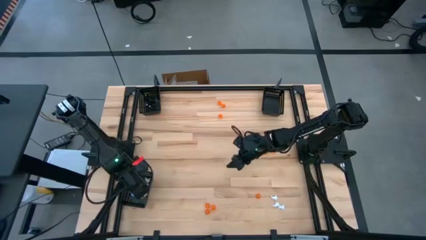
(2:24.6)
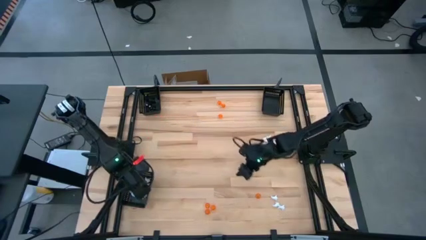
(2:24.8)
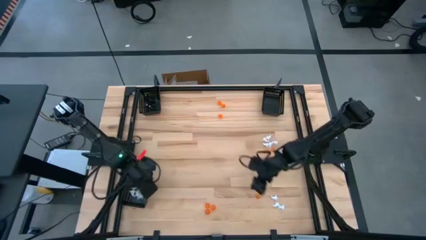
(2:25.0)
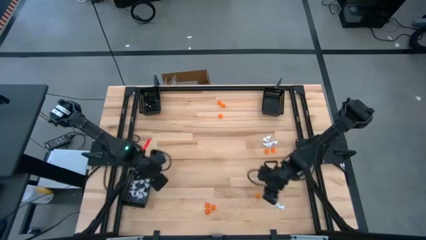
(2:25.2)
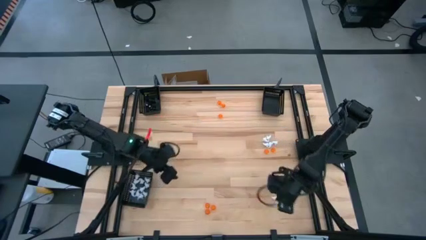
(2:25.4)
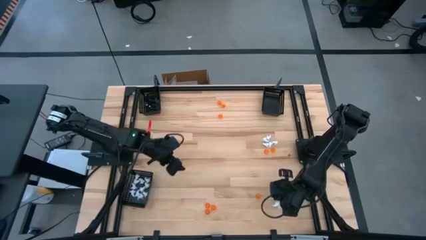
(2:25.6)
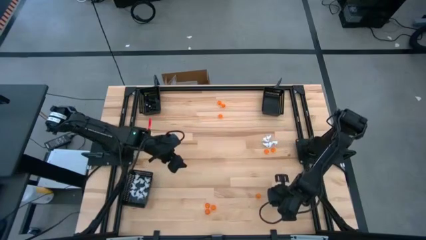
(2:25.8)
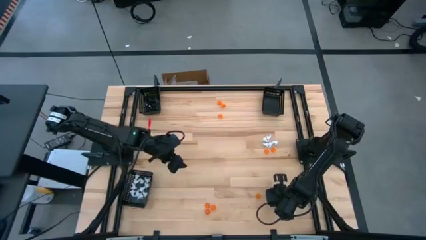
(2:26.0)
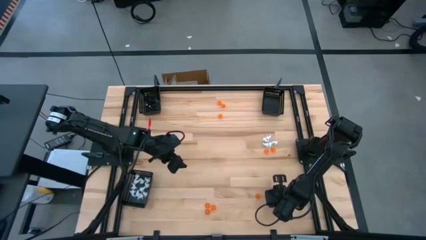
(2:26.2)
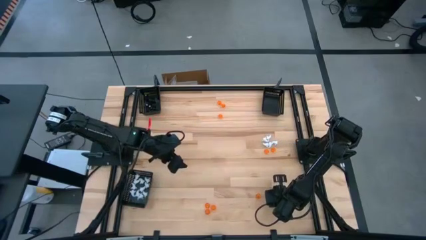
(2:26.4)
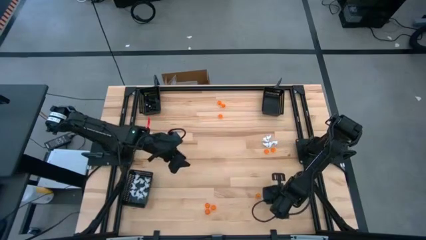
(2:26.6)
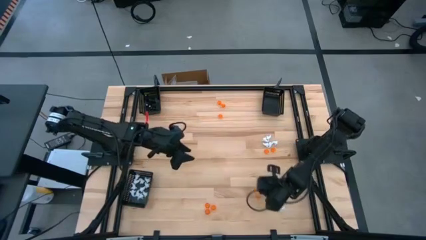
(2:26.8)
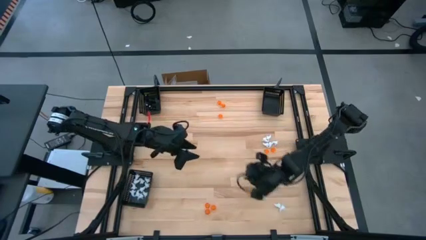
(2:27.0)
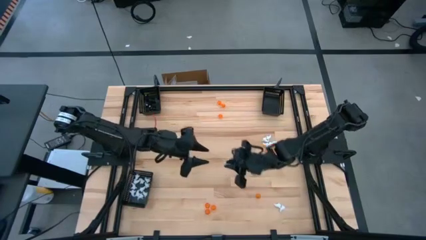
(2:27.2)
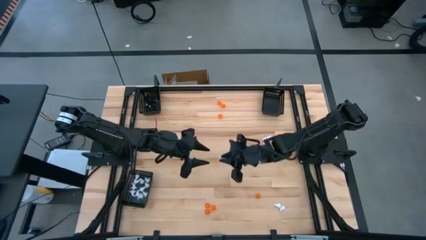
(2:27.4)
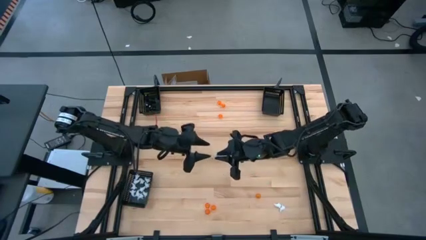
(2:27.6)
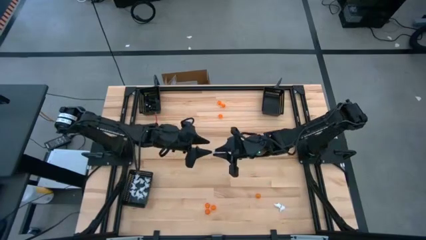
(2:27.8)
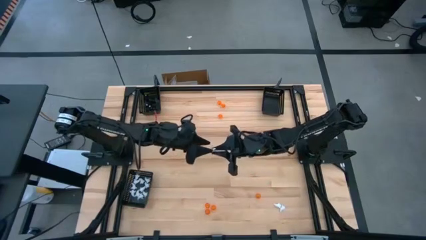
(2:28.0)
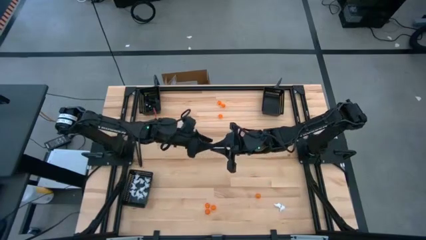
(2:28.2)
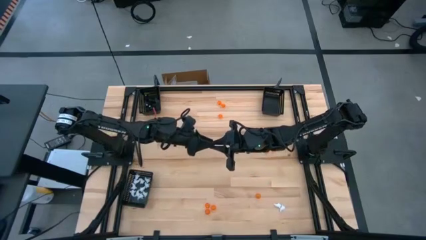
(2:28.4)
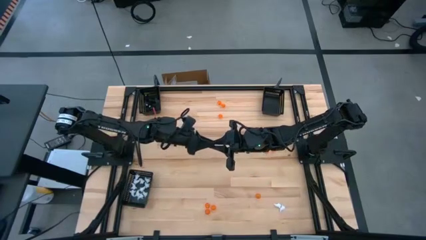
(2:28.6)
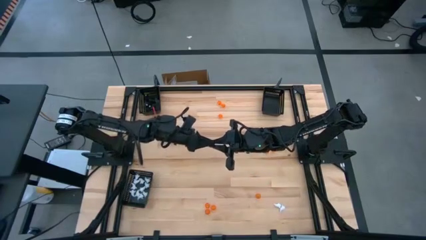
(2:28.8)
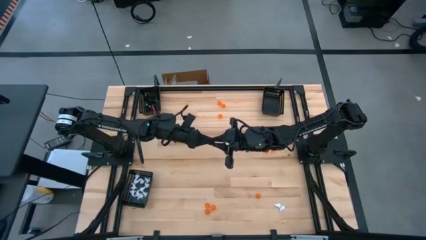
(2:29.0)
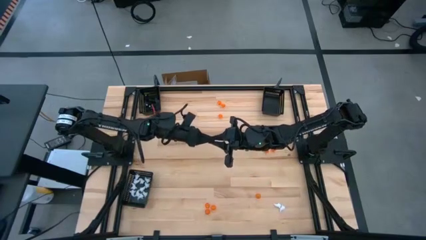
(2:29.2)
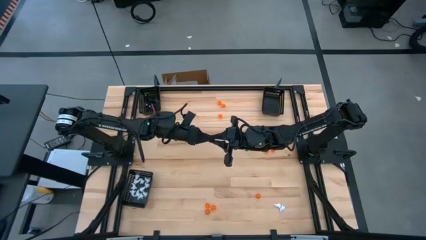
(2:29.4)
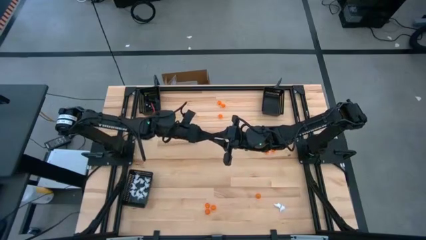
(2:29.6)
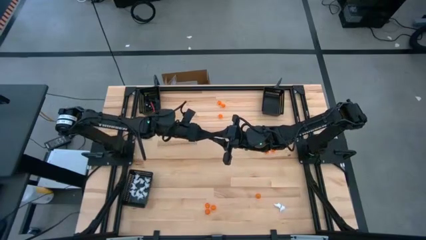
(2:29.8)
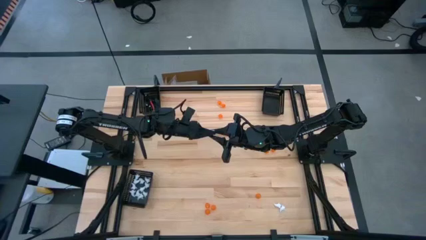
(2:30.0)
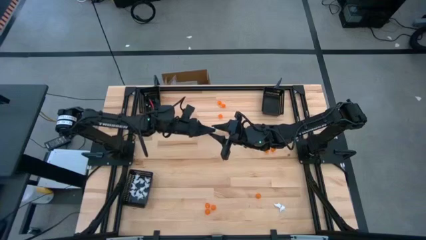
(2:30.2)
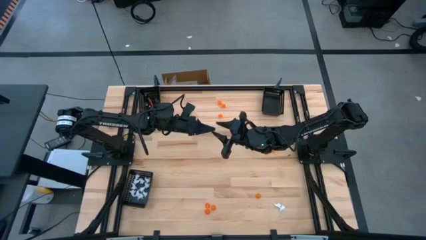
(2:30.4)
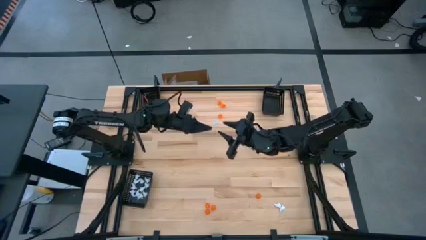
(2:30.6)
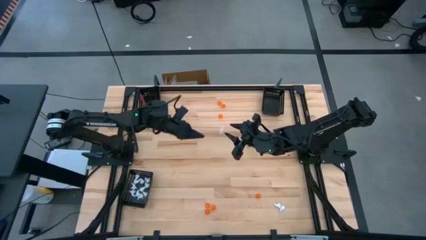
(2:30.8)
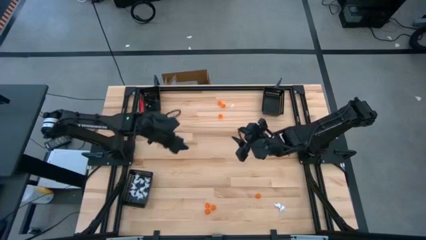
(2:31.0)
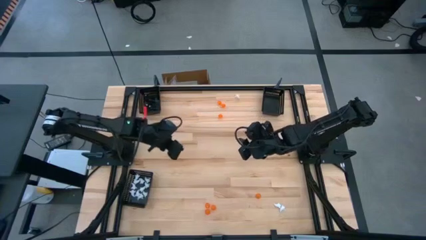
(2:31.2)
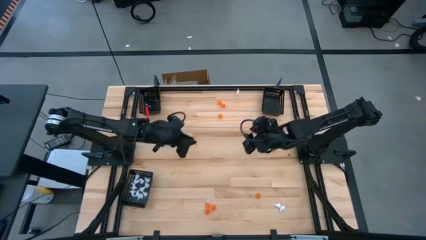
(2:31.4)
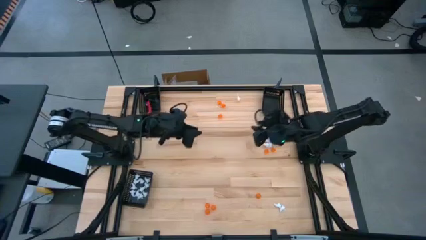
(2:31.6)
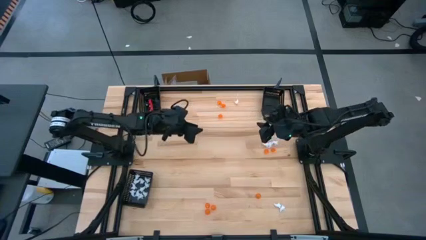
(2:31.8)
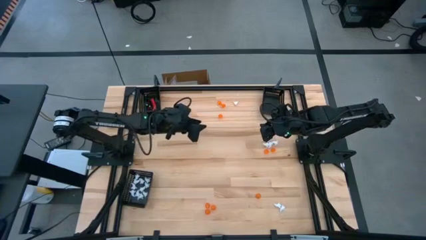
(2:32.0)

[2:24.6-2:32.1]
Task: Sort Halloween decoration
Put the white ghost toy into the bottom black basket

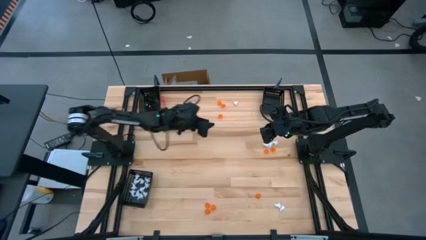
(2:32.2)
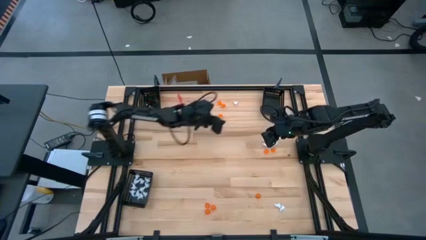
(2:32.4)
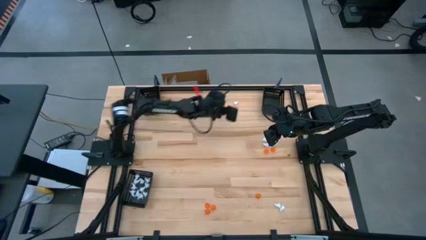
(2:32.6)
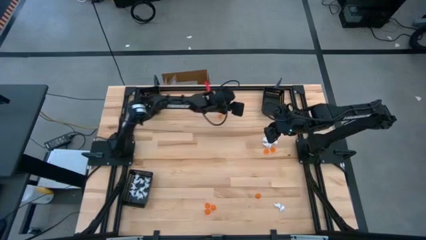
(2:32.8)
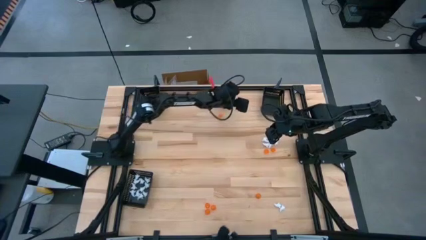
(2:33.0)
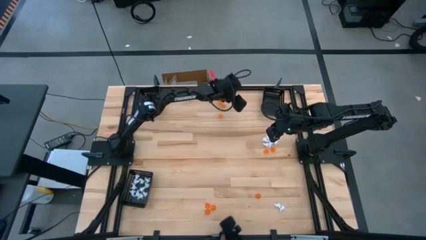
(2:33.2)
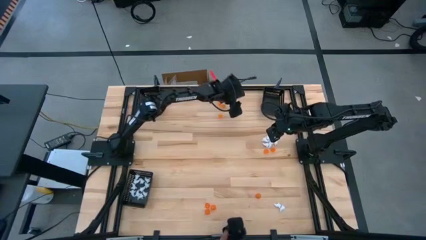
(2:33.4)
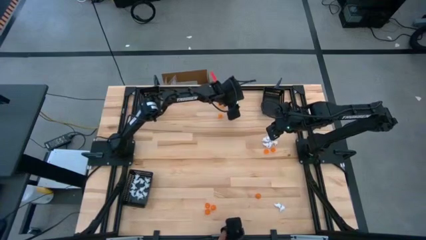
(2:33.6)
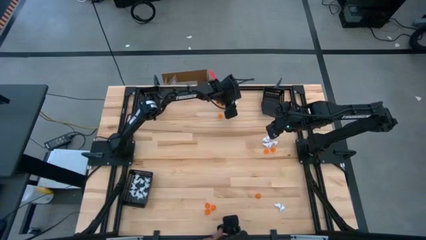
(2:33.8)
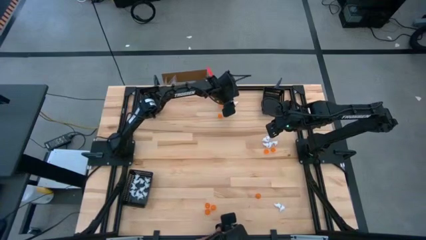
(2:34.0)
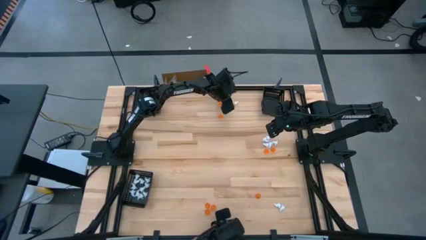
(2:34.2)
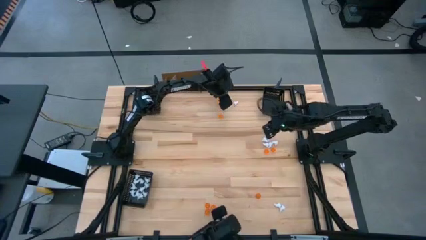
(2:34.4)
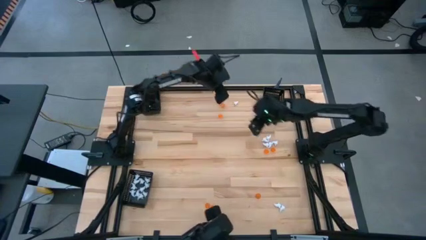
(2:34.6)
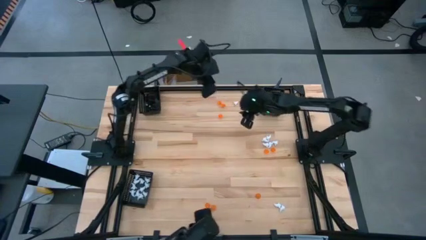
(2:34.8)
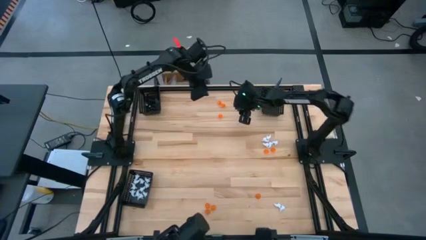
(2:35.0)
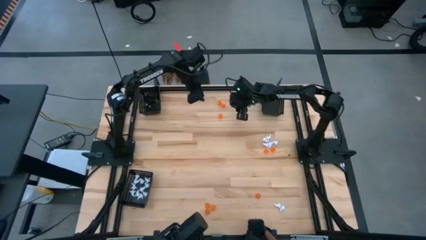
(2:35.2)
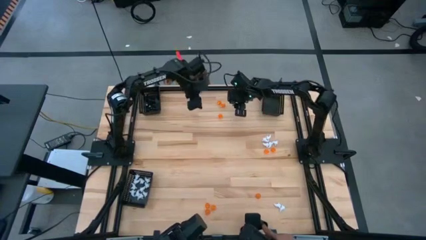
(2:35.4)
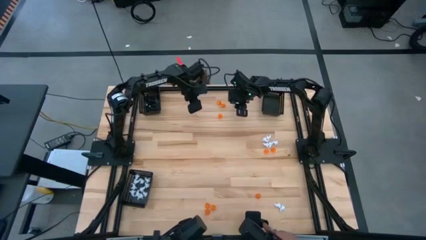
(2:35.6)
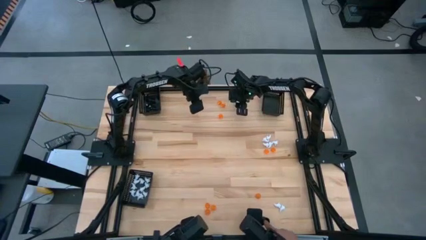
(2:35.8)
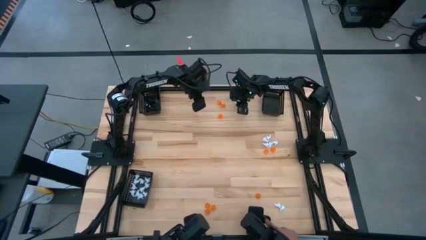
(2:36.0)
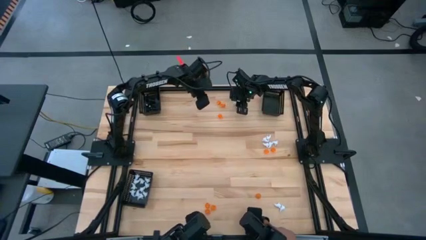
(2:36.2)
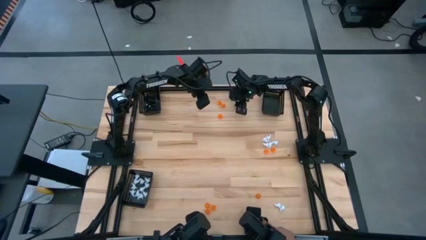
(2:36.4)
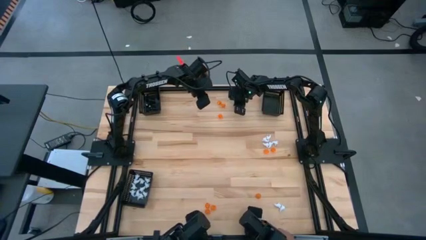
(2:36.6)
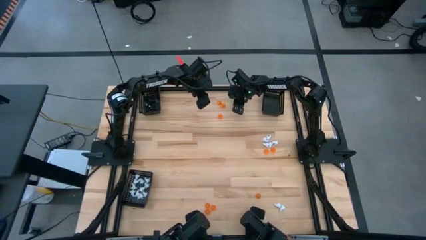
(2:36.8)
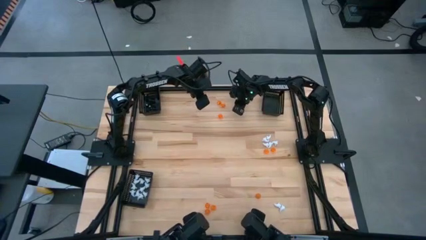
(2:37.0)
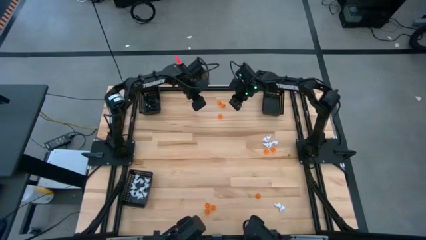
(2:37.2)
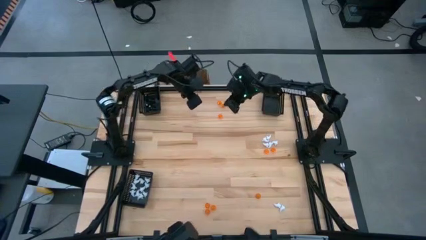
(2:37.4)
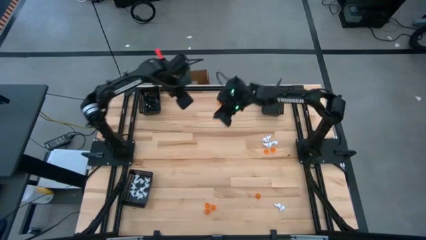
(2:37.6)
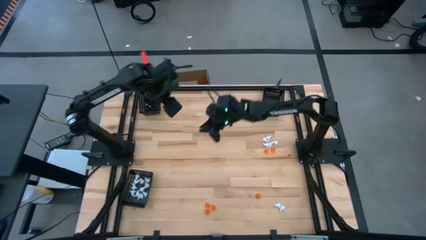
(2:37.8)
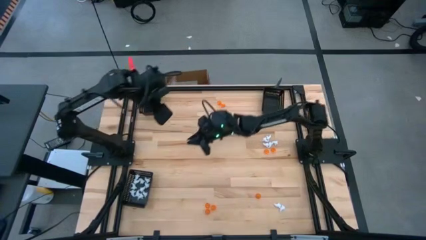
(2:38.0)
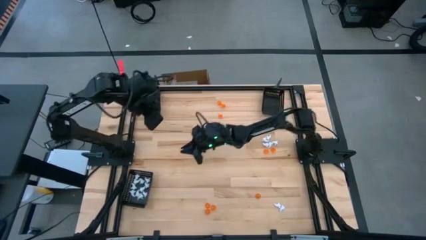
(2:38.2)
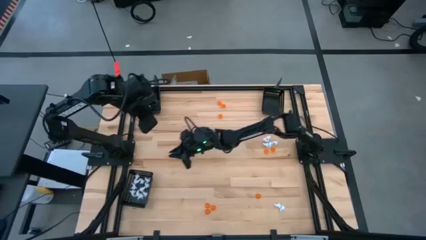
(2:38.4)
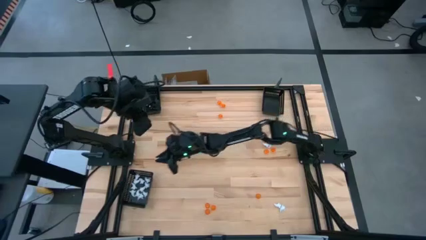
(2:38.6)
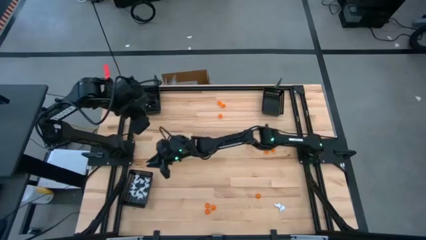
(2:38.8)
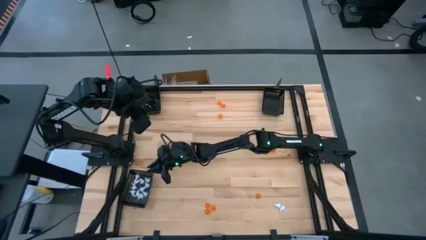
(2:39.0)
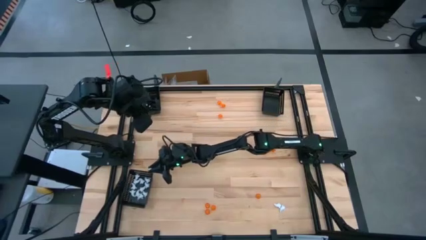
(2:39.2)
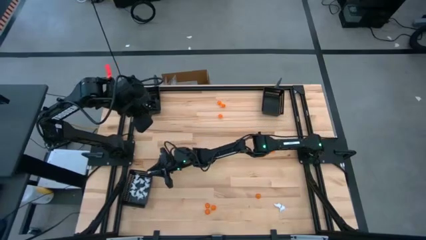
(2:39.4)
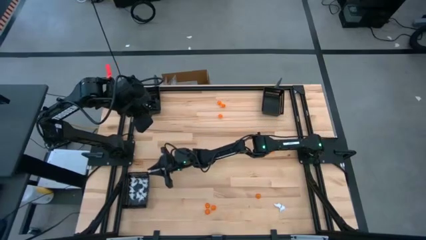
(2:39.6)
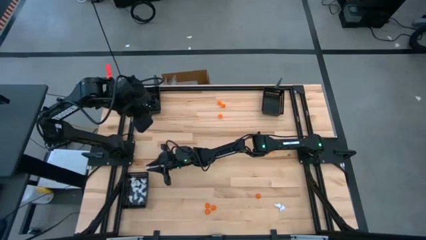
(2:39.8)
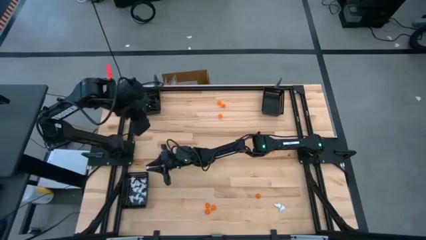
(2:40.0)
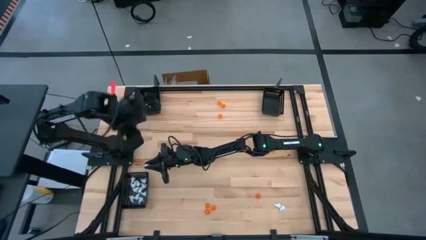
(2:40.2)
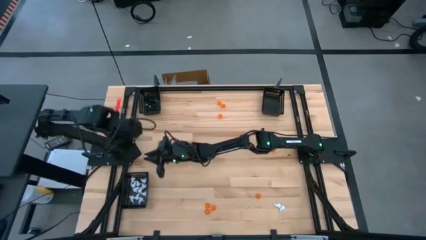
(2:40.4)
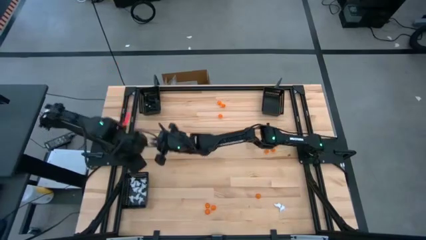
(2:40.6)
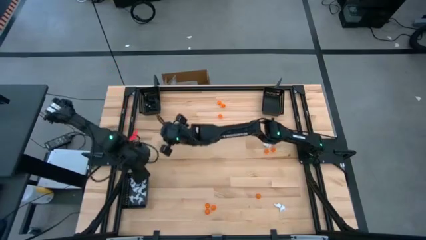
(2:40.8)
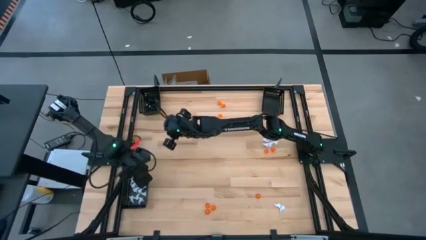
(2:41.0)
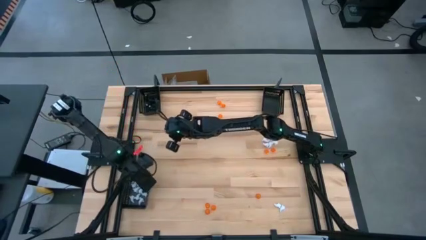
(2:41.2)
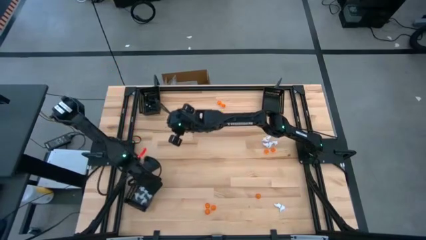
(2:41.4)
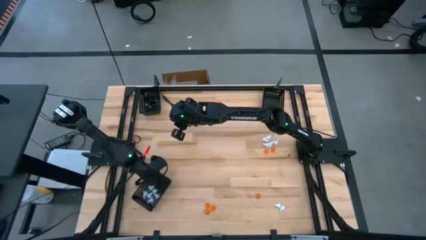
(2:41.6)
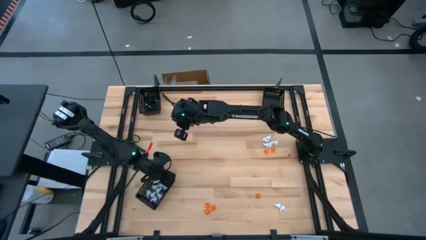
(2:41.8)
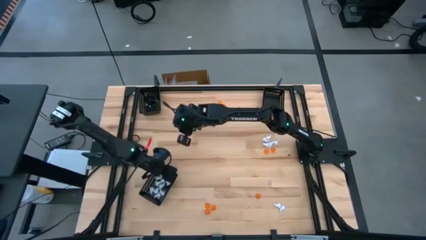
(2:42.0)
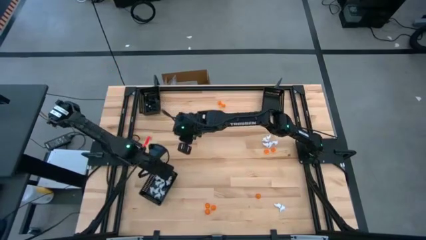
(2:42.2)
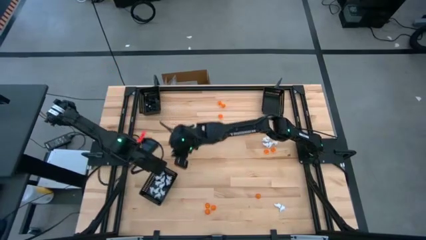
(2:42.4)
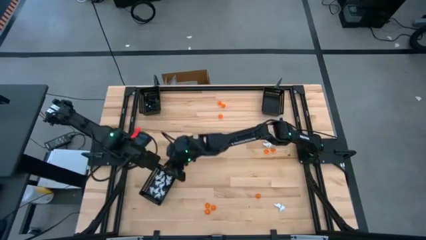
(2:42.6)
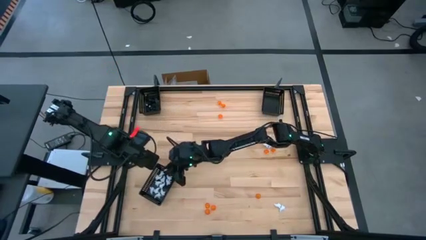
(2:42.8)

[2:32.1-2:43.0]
Put the white ghost toy into the bottom black basket
